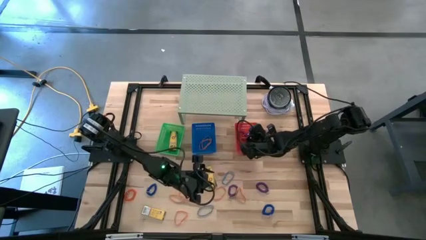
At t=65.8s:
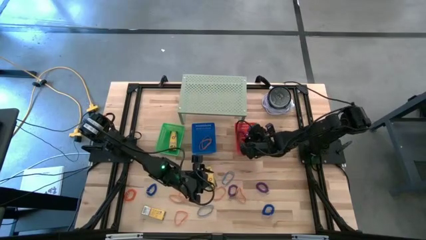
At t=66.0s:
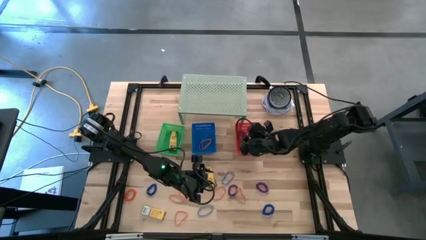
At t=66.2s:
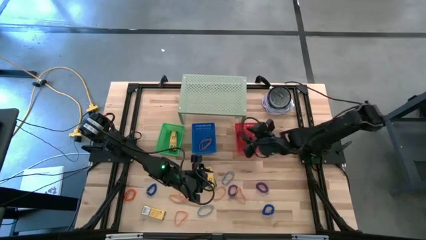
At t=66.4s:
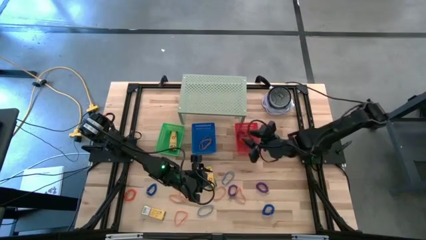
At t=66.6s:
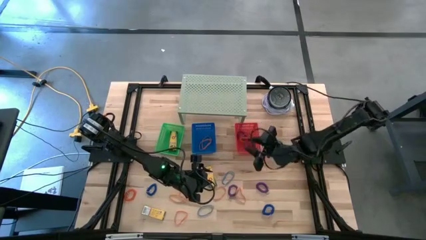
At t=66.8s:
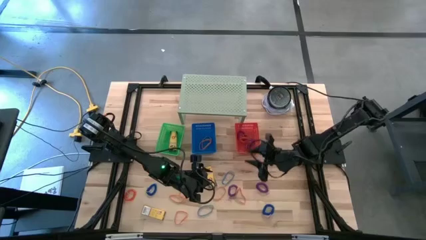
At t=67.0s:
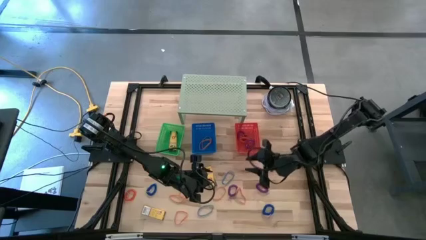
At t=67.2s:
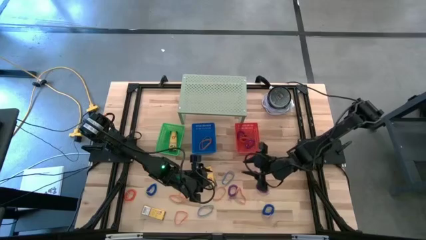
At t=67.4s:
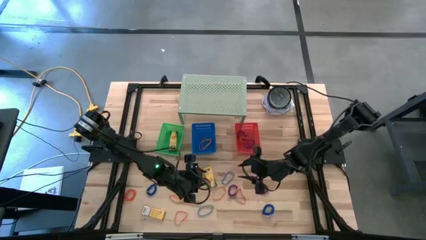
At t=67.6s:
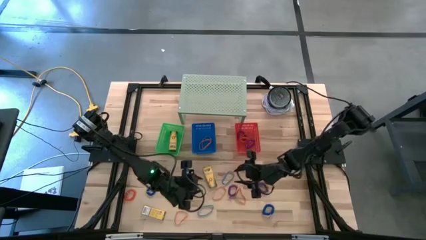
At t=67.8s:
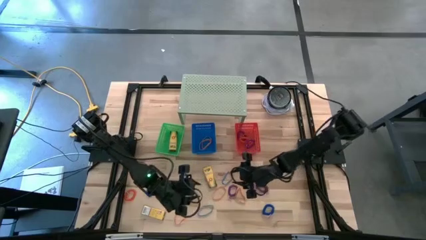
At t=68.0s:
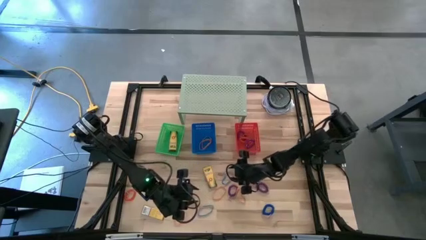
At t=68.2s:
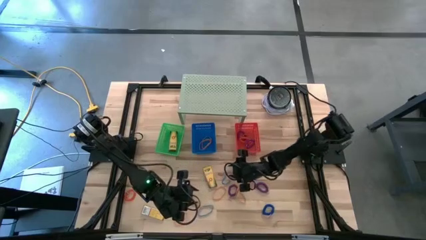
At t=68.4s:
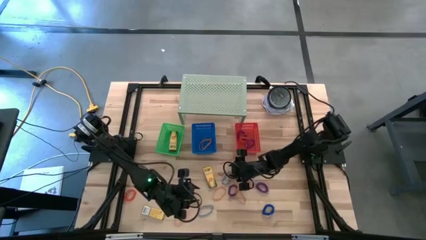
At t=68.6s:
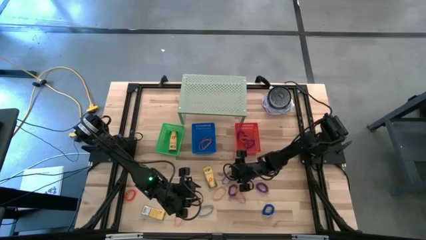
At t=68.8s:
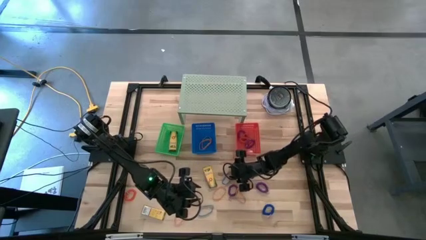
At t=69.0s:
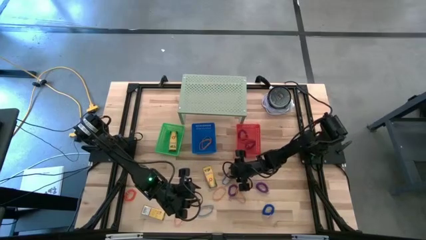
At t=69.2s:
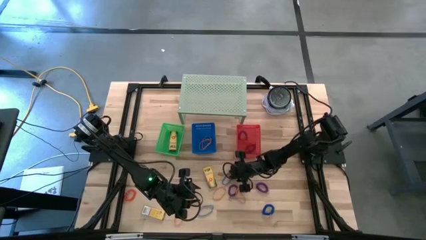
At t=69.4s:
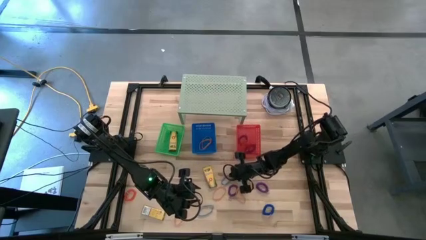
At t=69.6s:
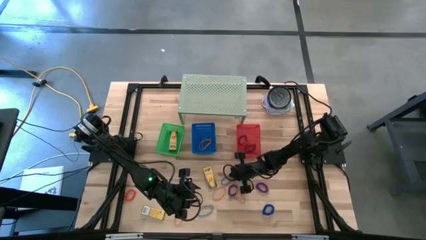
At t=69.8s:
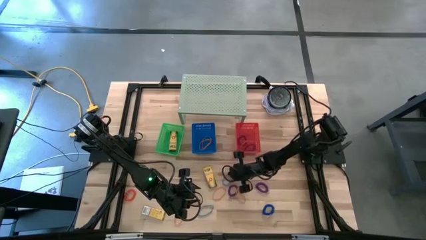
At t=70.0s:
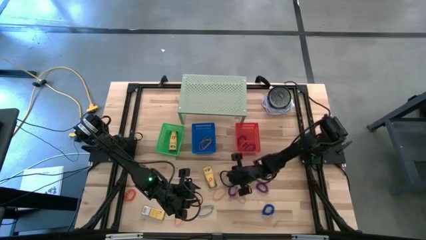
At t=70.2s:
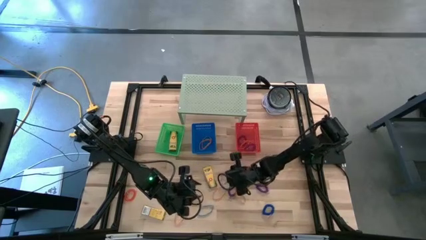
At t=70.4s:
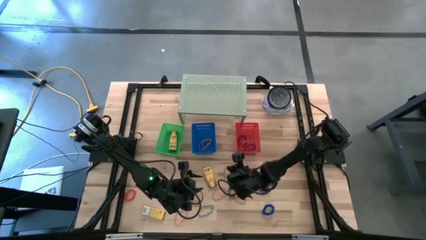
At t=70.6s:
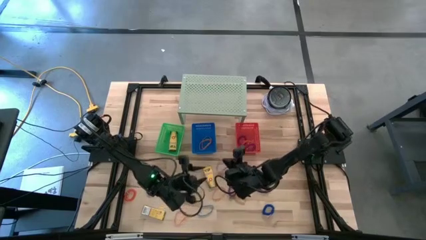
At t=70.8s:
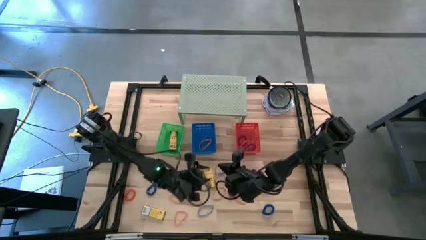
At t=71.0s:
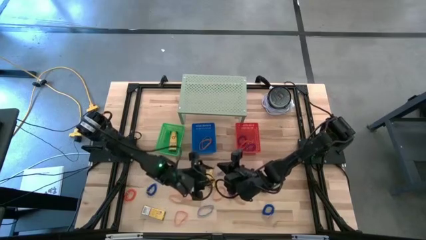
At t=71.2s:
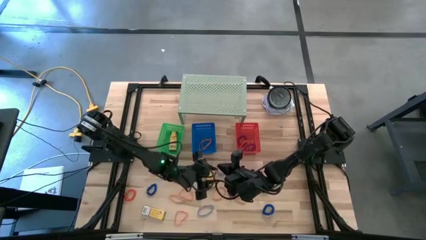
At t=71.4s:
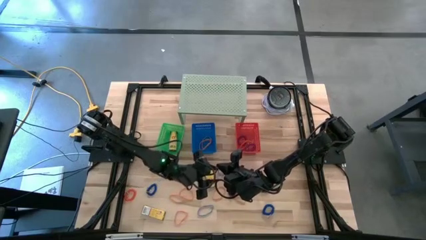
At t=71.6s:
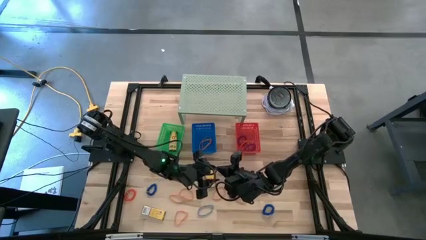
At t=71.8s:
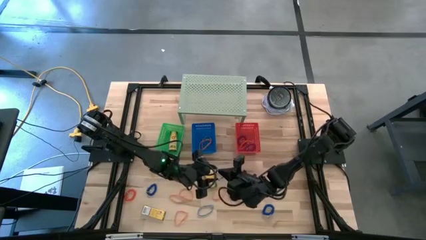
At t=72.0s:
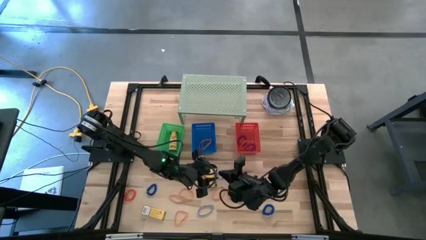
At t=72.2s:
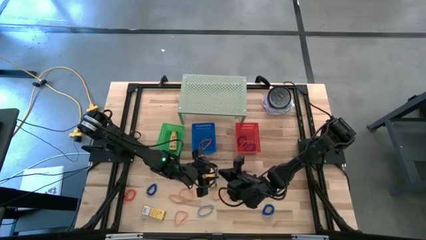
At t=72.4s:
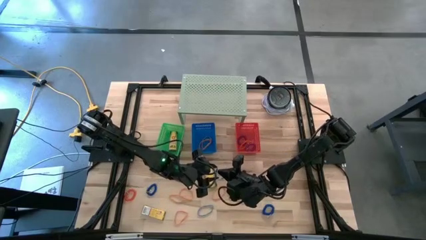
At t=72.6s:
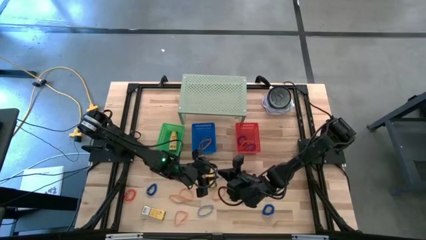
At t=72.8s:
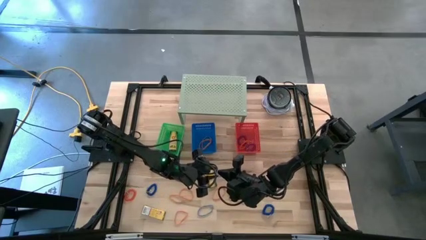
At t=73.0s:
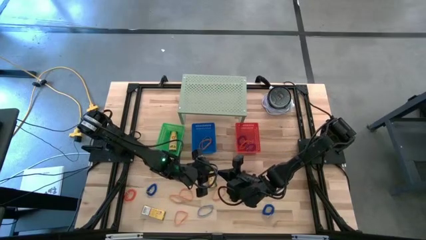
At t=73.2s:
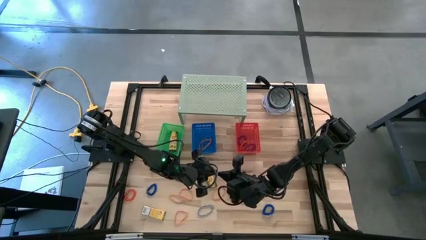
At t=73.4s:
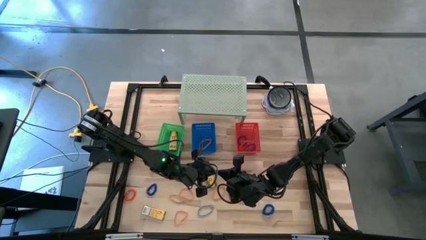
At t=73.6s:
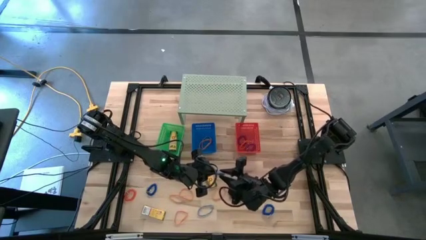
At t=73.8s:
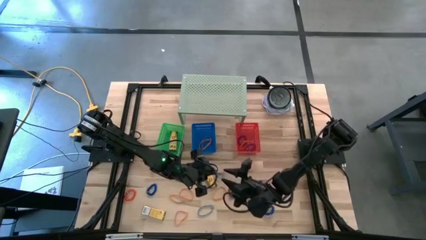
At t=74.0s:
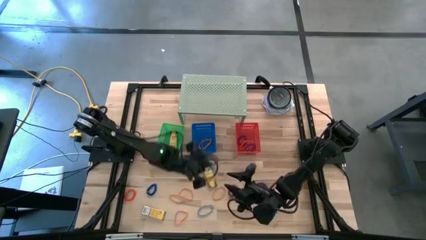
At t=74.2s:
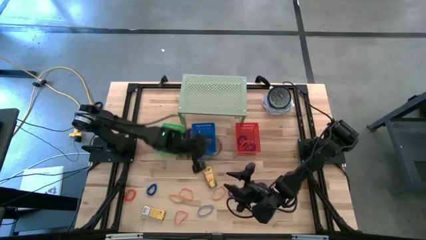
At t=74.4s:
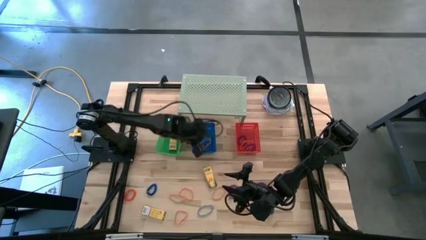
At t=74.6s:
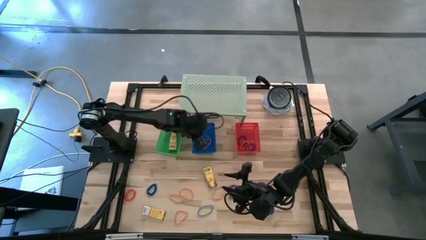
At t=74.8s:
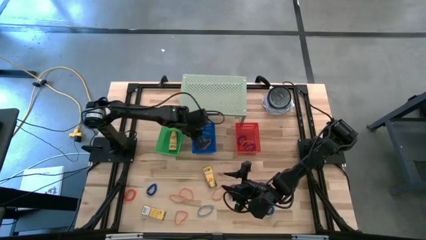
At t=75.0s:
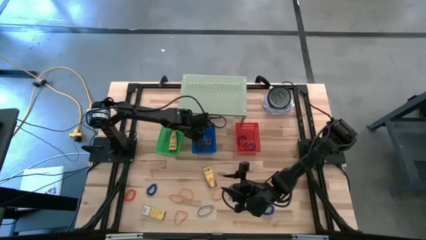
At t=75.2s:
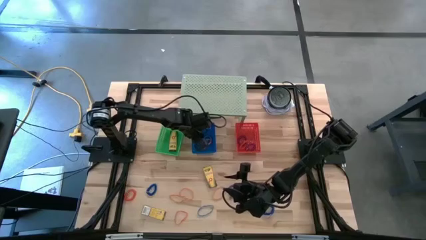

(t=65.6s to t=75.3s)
Task: Pick & Place Office Desk Supplies
Put the blue rubber band into the blue bin

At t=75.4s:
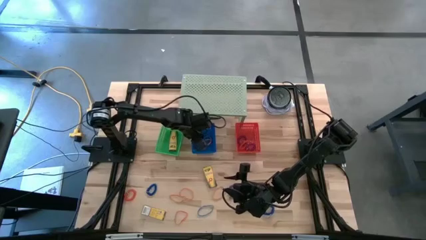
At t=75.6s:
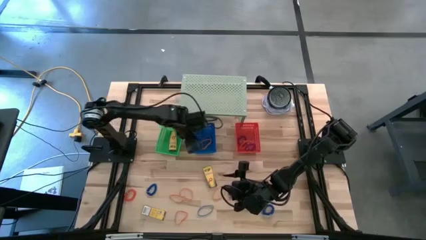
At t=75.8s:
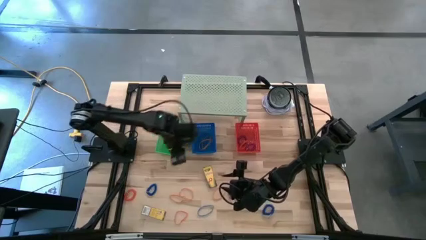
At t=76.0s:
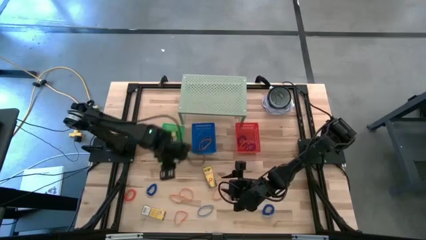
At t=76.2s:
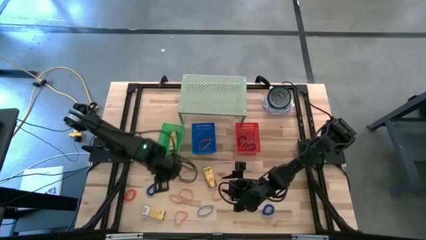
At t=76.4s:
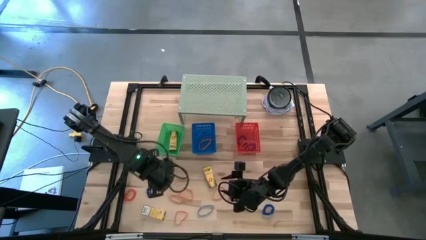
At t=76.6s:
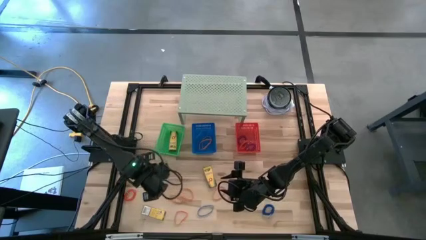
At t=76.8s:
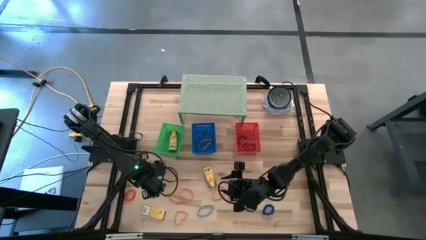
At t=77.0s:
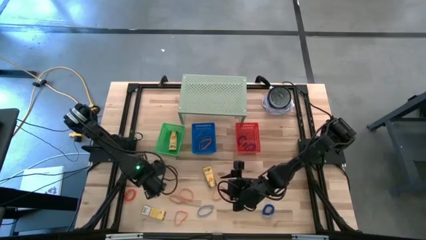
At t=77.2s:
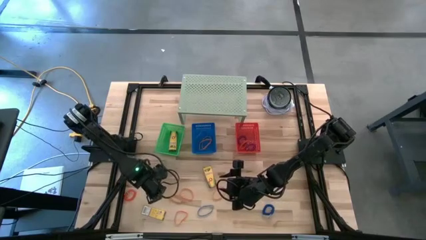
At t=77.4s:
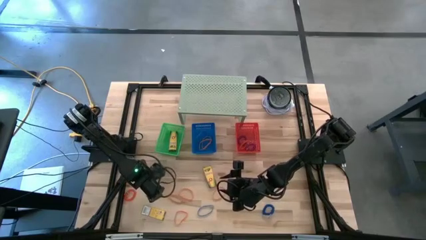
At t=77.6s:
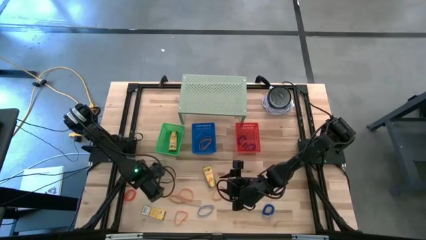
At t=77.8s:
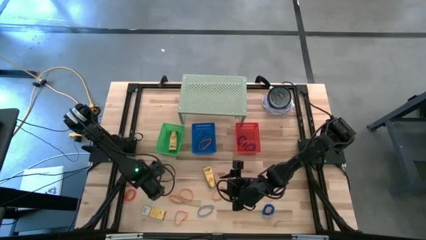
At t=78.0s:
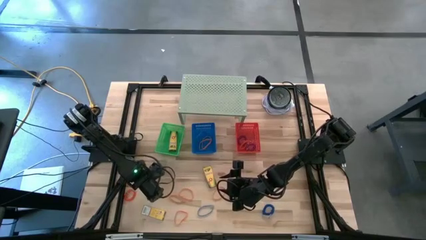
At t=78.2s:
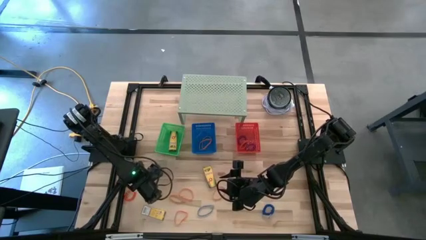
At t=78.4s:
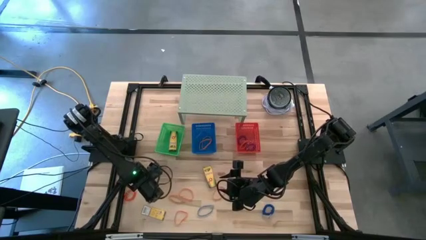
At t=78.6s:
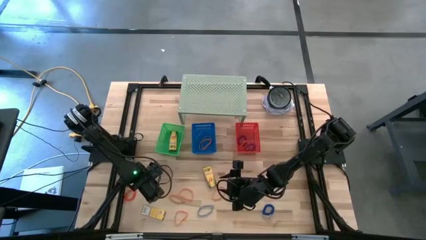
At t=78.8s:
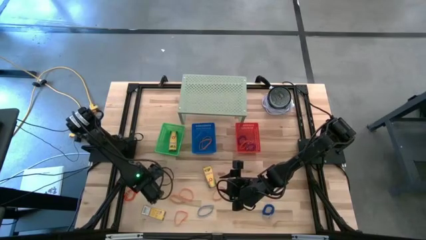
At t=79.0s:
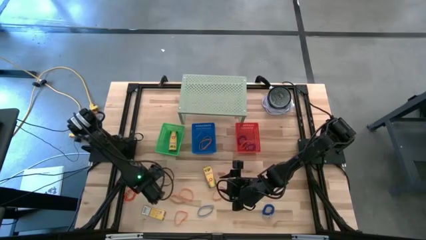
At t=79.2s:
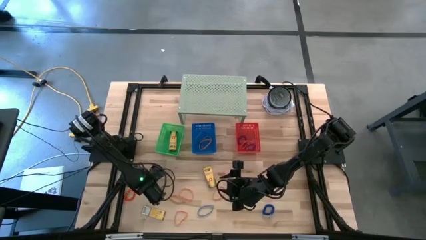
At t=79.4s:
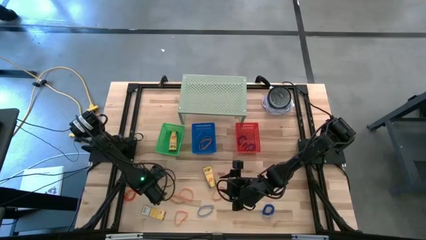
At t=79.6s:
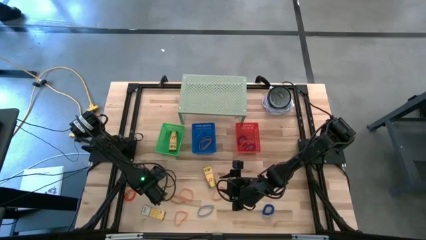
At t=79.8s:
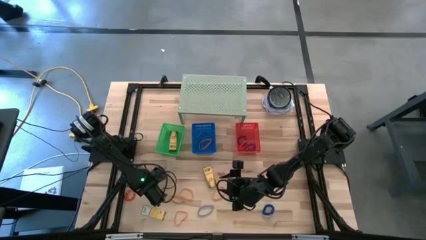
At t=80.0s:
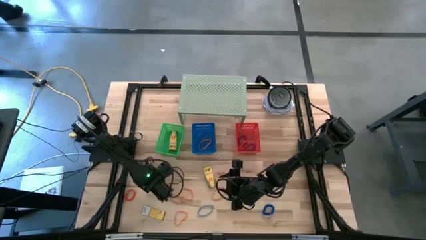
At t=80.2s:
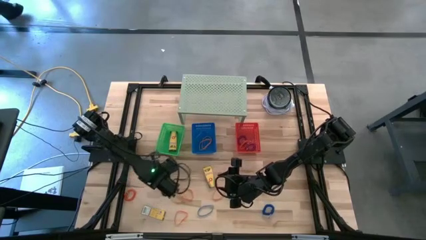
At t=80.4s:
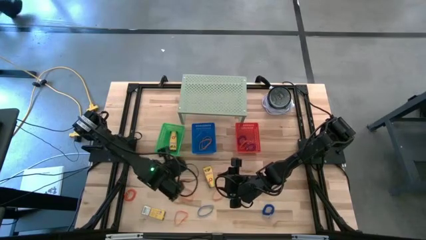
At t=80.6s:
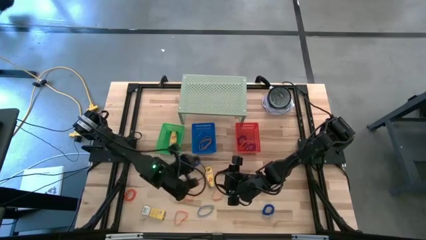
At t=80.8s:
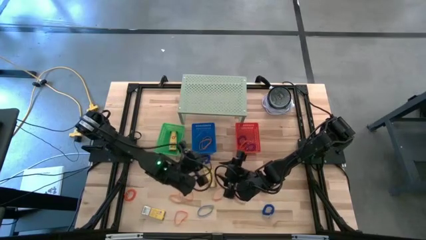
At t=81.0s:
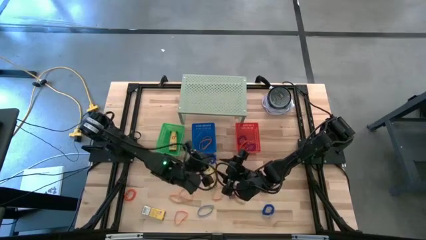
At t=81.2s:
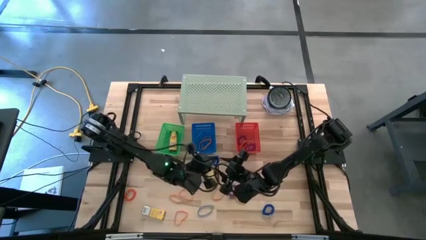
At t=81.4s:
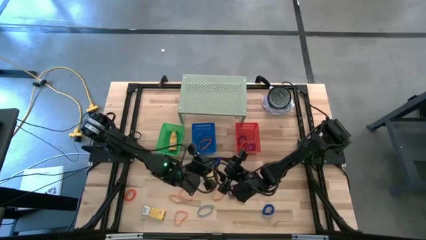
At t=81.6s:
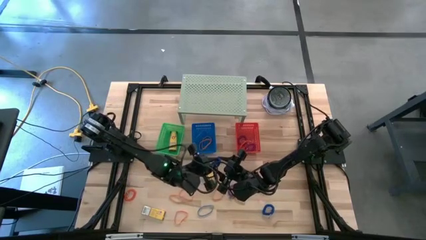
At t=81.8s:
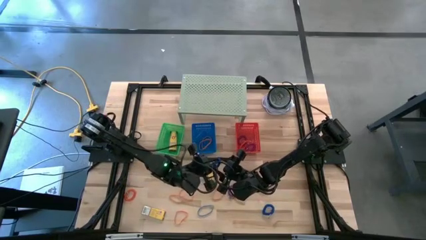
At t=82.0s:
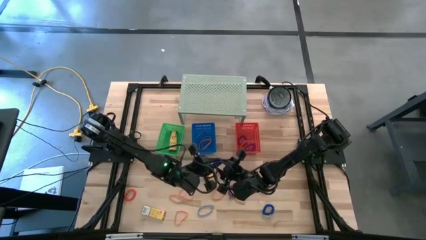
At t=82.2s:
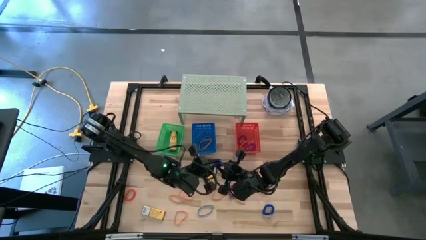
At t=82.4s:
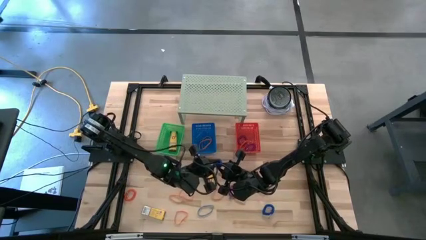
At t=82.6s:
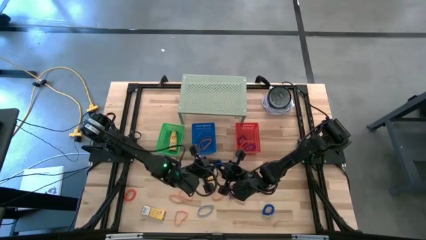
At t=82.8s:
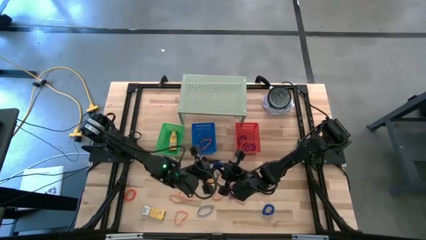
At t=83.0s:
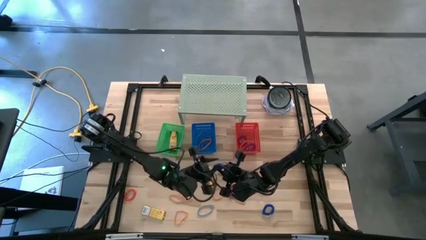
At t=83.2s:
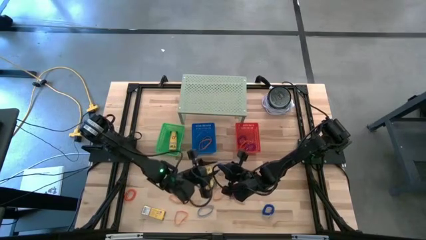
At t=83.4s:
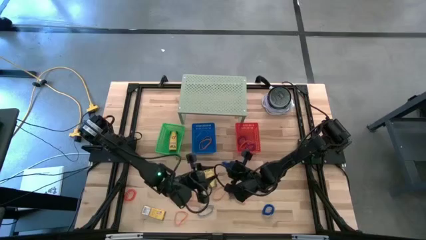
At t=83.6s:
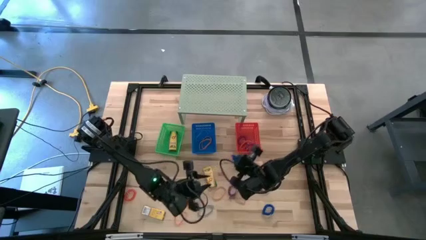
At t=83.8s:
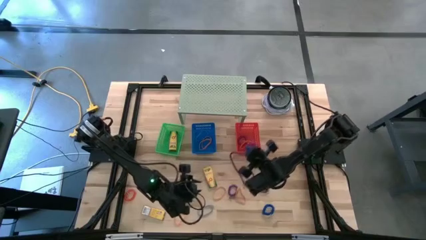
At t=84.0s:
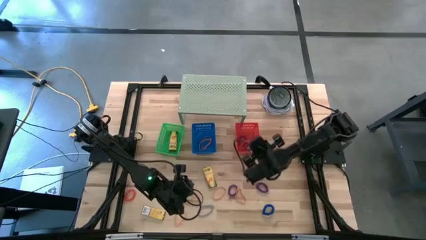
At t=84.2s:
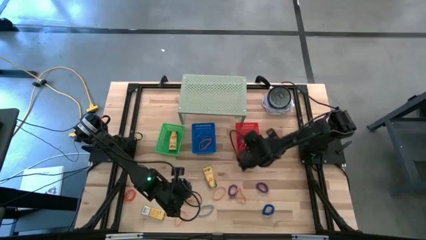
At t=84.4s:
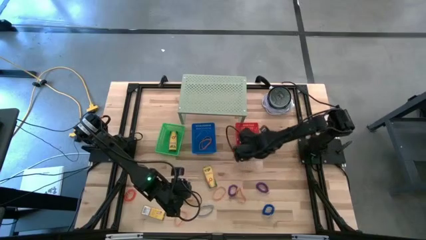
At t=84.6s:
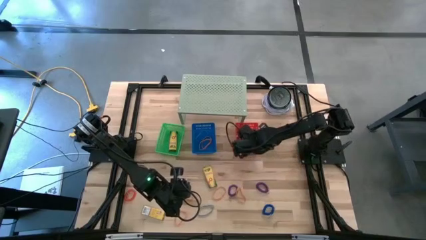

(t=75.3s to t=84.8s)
Put the blue spring keychain into the red bin
